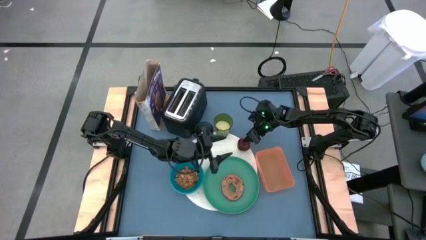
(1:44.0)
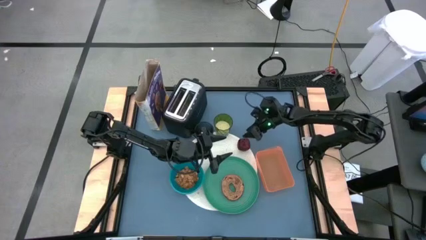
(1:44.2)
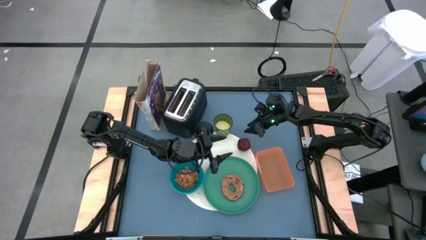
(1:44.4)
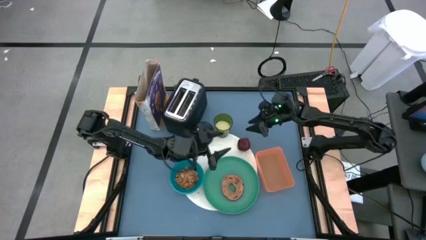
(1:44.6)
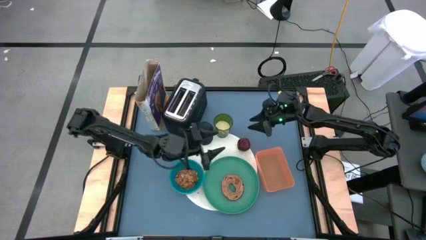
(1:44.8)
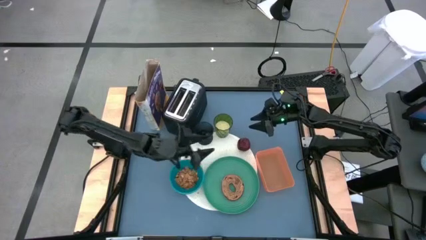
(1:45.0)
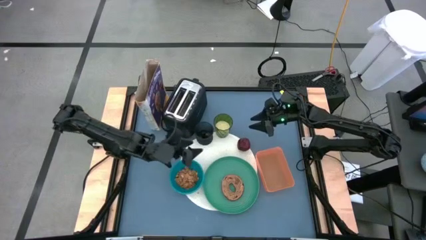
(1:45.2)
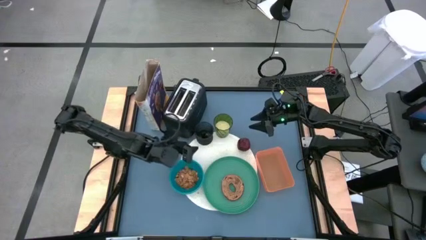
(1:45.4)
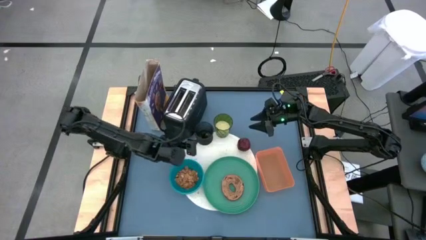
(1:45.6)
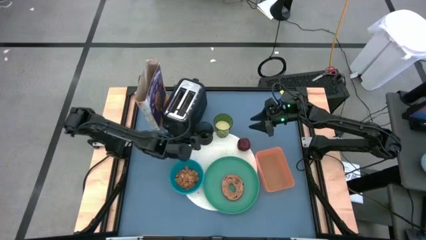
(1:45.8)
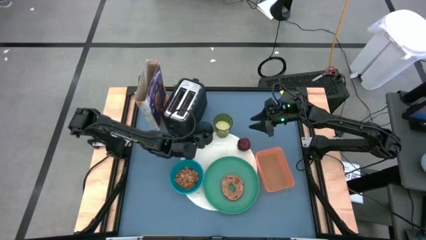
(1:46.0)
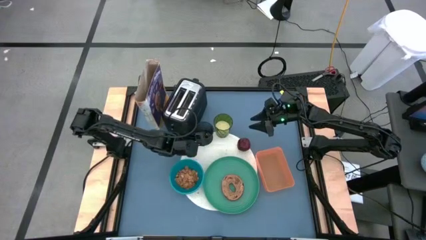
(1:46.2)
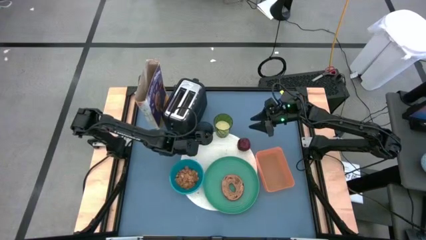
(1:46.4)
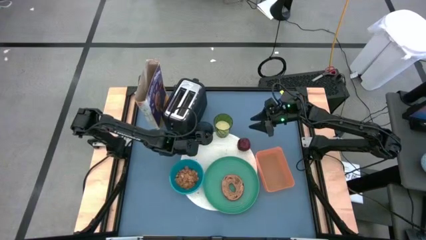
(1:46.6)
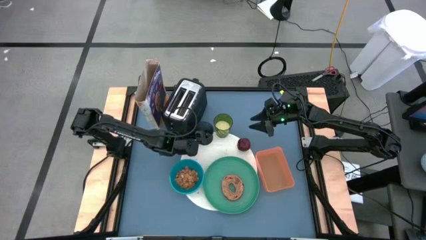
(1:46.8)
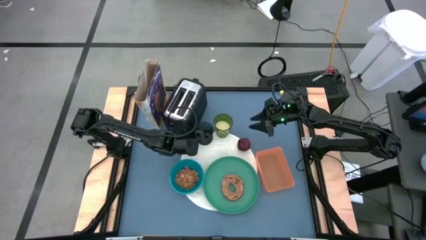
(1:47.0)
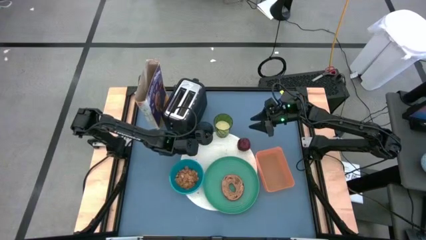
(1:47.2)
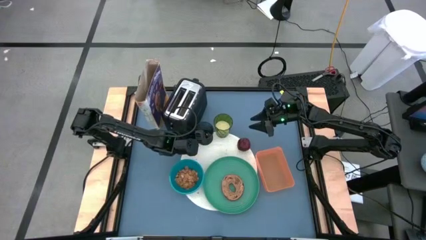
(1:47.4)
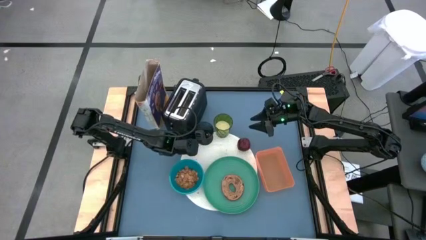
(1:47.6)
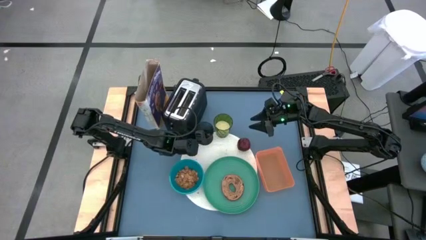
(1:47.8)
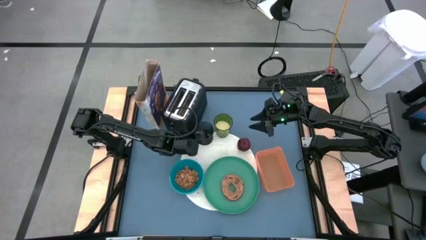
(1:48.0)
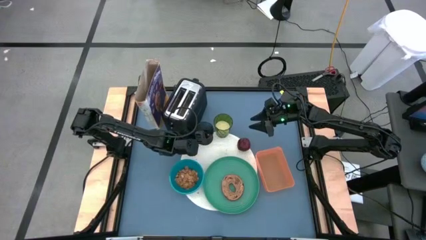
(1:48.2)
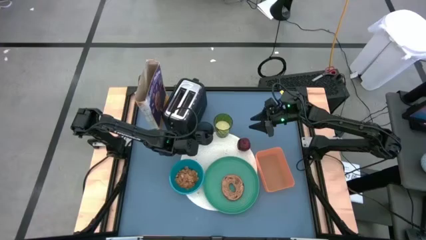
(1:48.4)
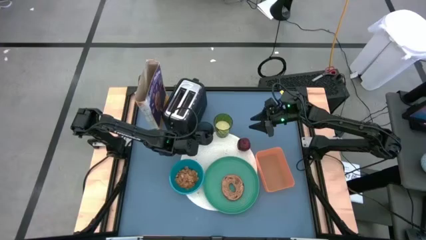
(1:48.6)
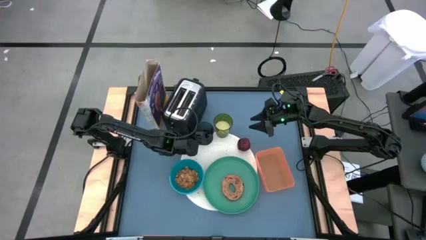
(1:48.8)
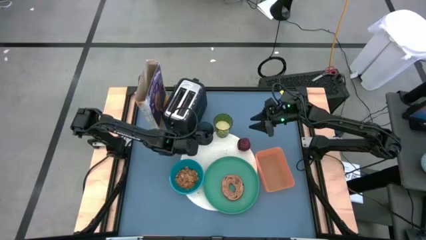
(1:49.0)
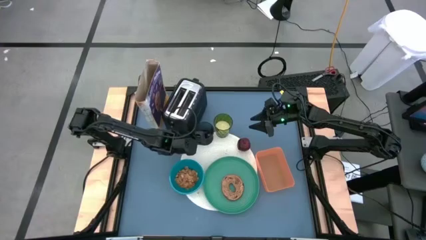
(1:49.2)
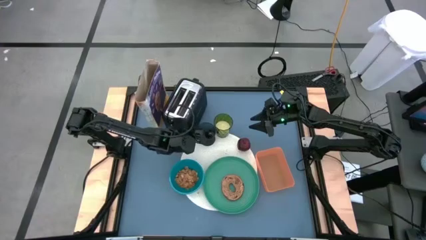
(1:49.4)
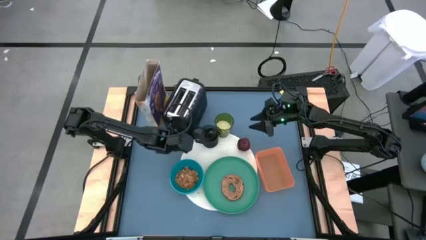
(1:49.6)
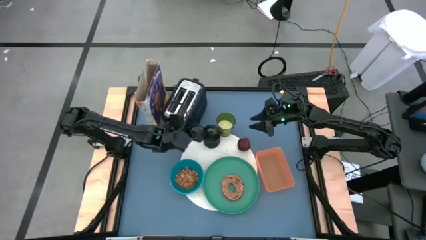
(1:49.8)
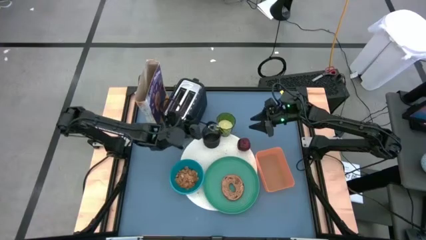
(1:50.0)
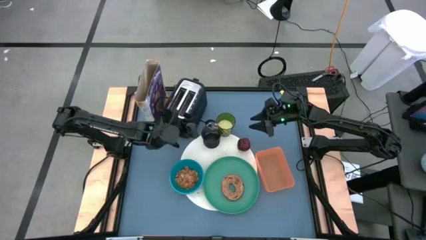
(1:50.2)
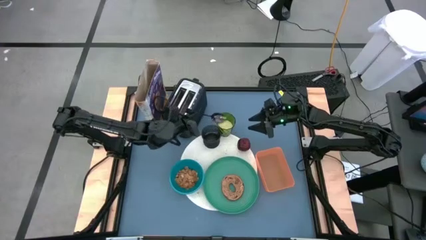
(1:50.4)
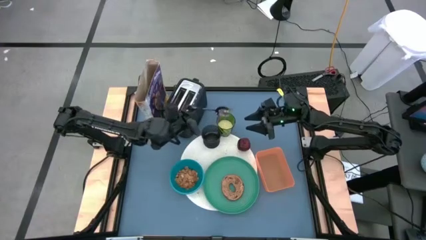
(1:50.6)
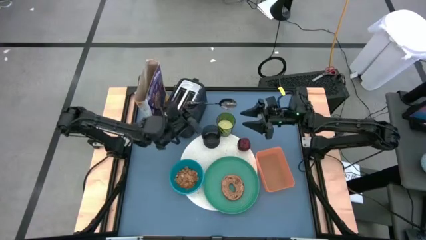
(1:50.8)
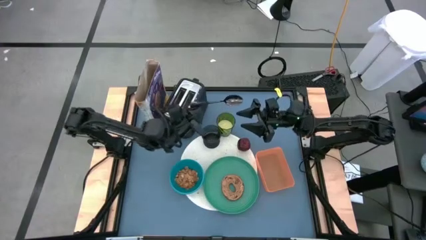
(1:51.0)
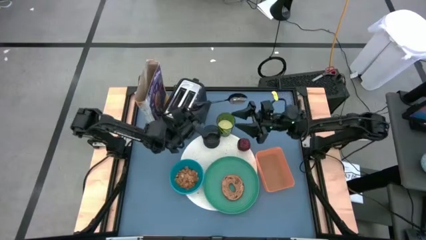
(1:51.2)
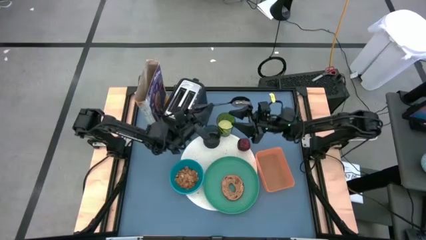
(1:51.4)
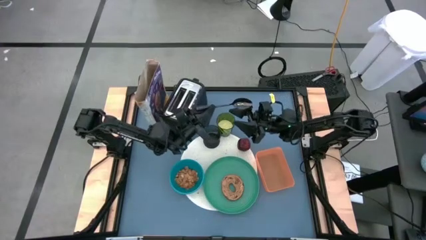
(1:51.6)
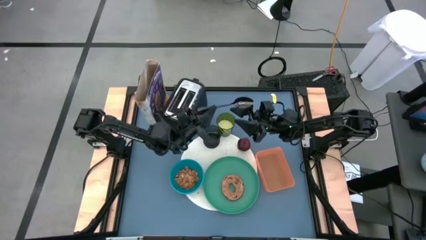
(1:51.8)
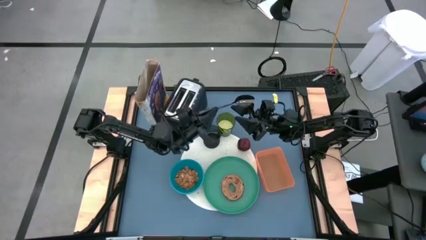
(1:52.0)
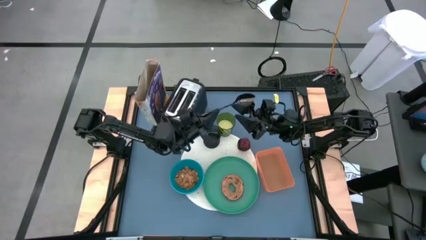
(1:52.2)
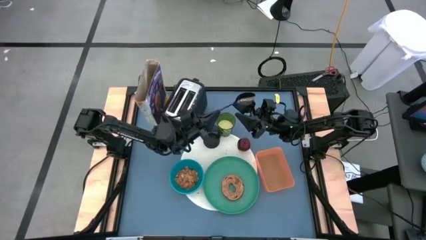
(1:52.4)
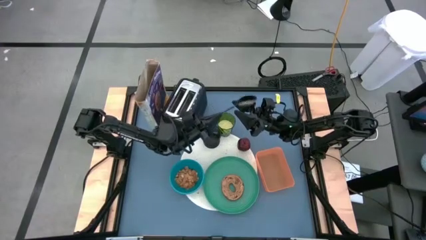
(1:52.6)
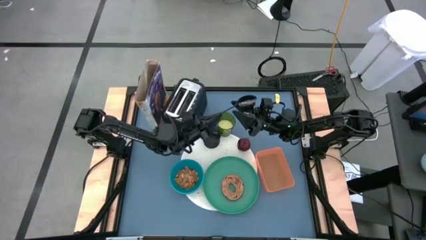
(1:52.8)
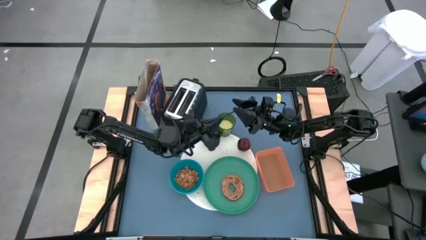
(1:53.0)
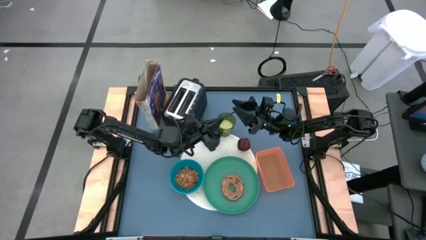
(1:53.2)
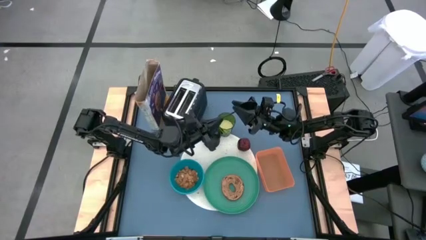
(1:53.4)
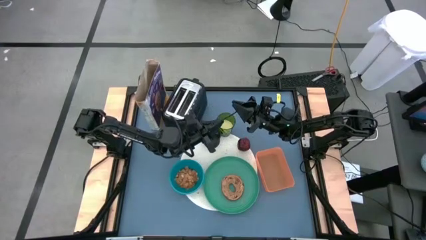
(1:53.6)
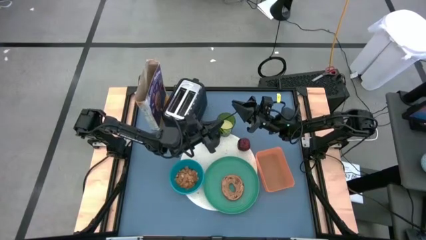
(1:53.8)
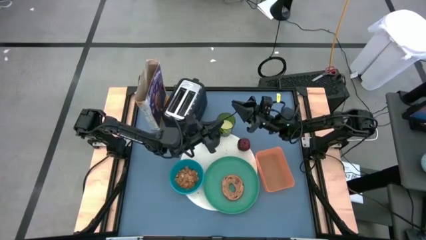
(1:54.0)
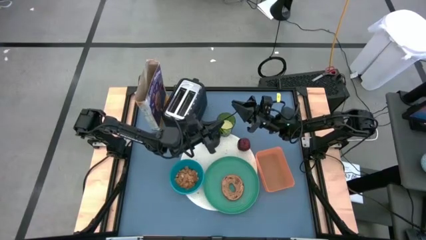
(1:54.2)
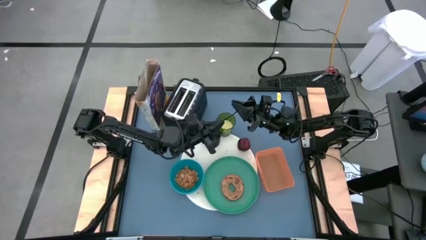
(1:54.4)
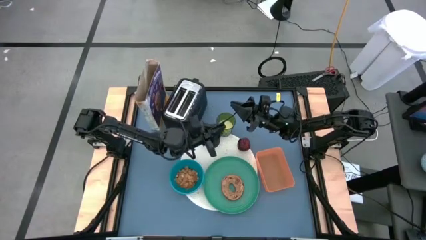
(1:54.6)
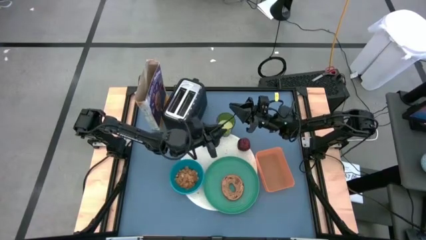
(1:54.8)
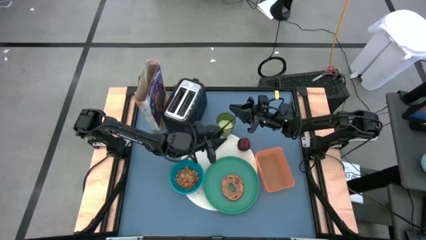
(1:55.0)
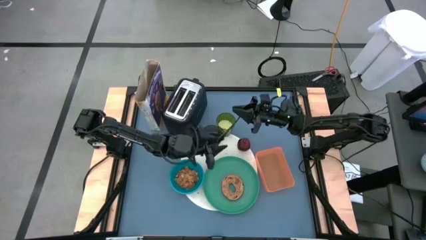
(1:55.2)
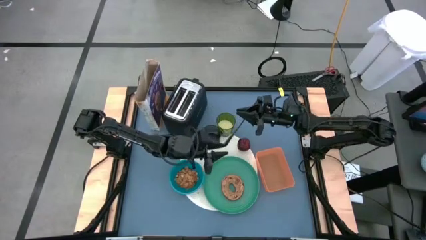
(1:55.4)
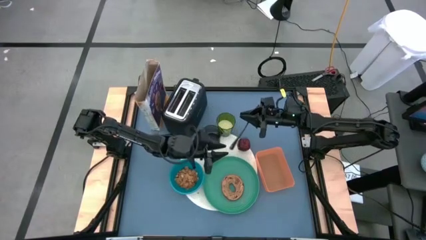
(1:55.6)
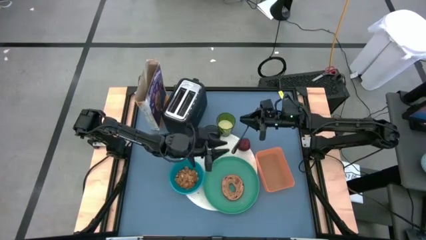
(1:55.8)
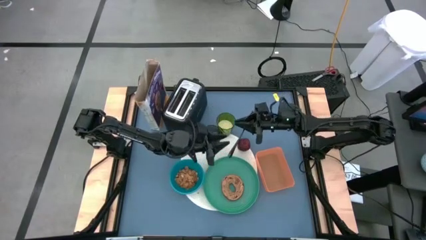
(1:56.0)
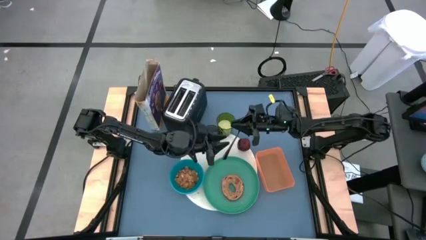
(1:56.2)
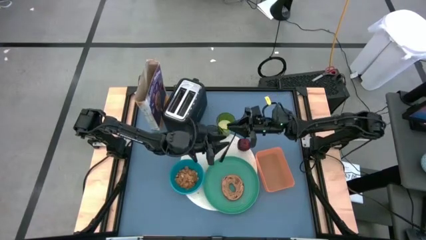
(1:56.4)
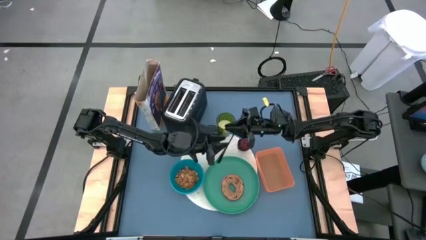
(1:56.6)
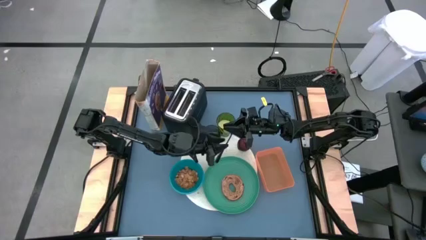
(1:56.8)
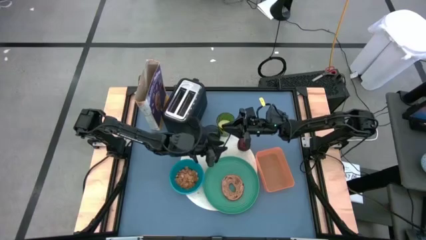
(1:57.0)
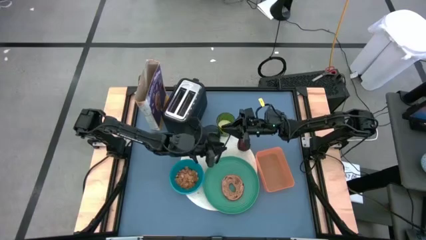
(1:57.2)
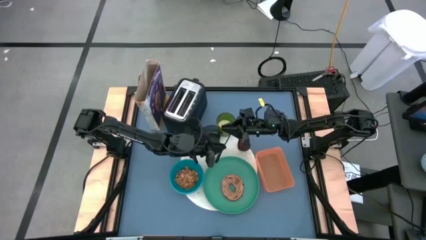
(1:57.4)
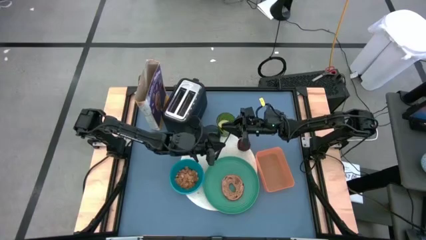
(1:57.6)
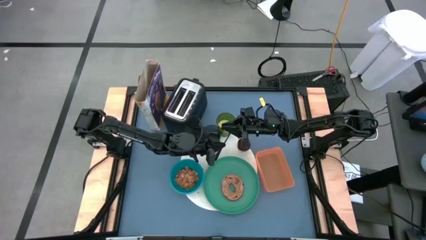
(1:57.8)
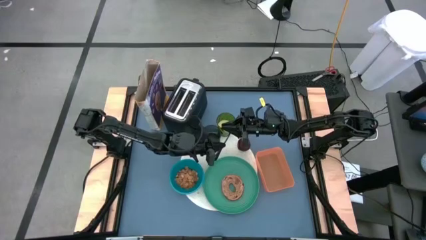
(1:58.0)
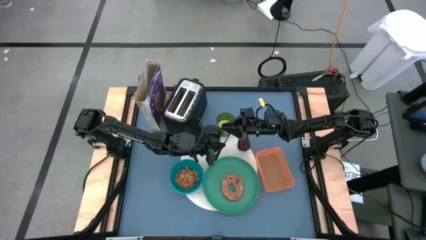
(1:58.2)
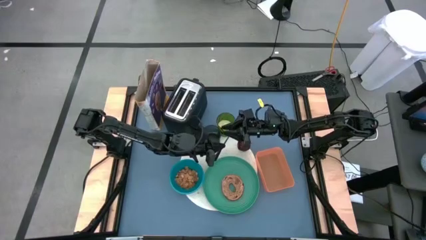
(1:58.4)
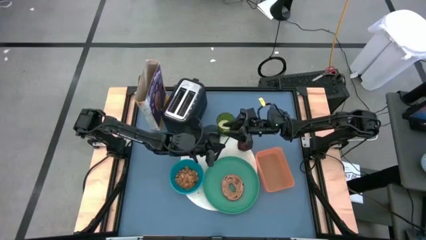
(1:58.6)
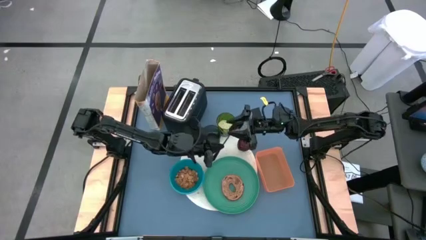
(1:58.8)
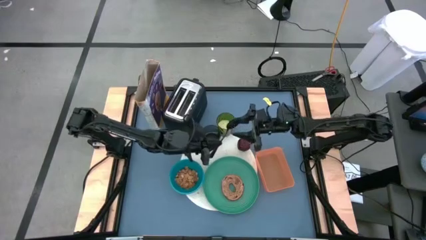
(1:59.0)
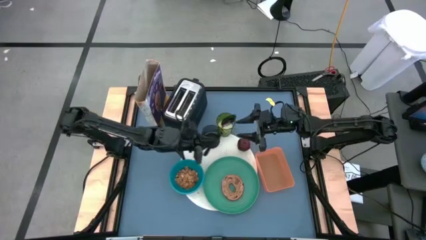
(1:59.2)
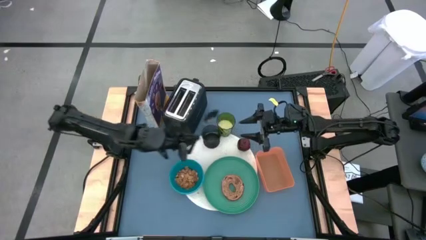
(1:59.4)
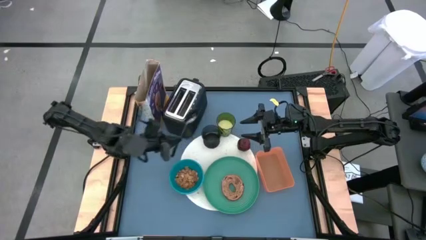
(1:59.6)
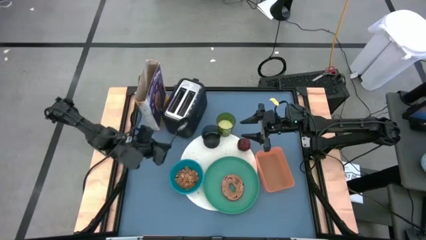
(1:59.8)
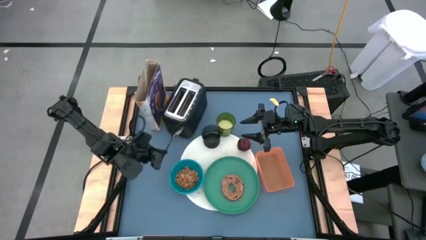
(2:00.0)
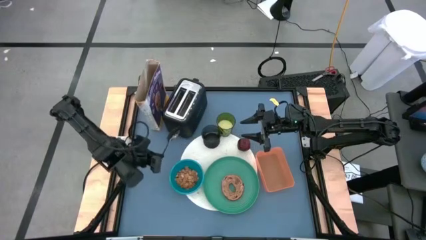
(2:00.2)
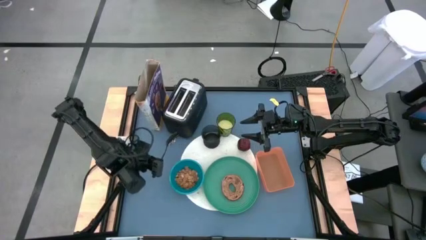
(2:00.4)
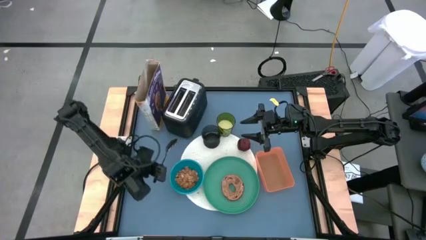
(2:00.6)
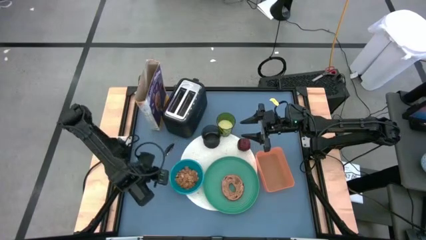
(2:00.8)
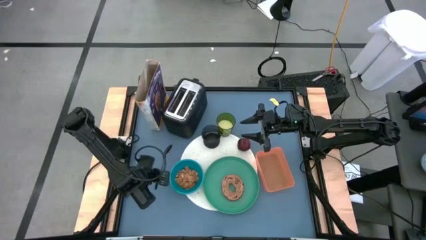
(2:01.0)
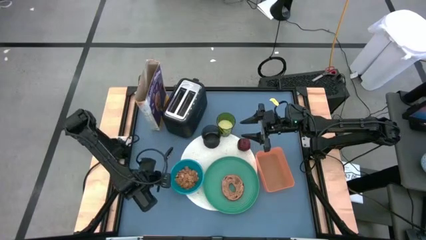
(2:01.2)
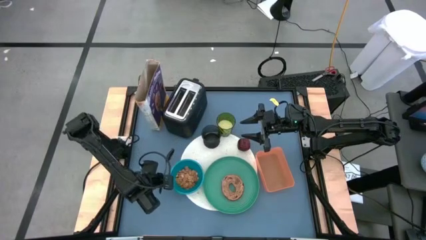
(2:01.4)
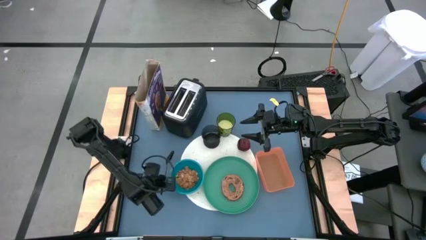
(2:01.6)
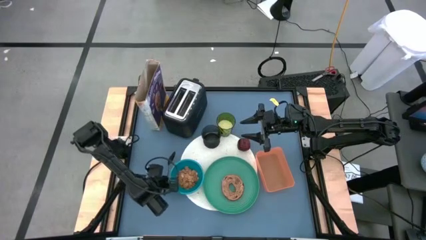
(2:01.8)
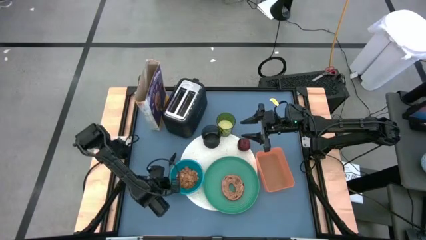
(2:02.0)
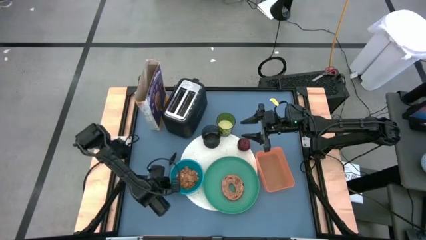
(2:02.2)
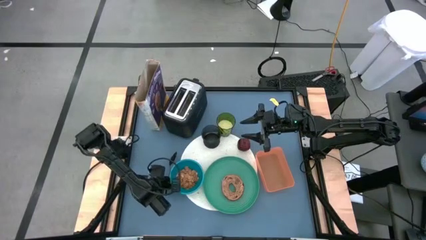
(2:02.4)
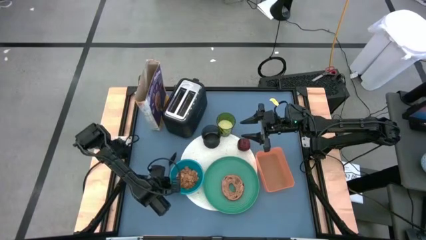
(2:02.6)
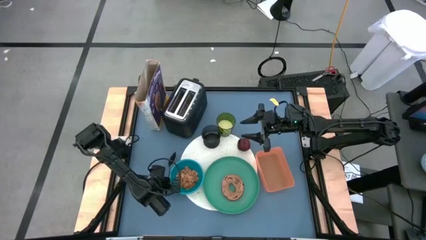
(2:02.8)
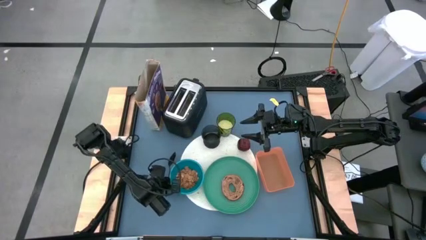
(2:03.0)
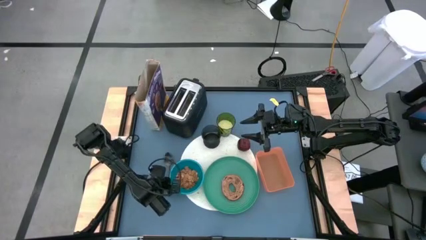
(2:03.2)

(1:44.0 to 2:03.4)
Task: Arrange a breakfast setting
Move the black spoon to the middle left of the table
